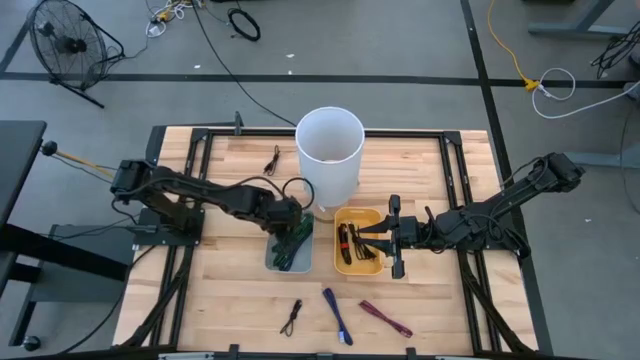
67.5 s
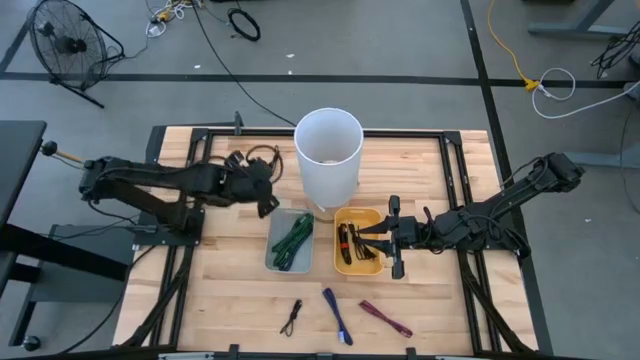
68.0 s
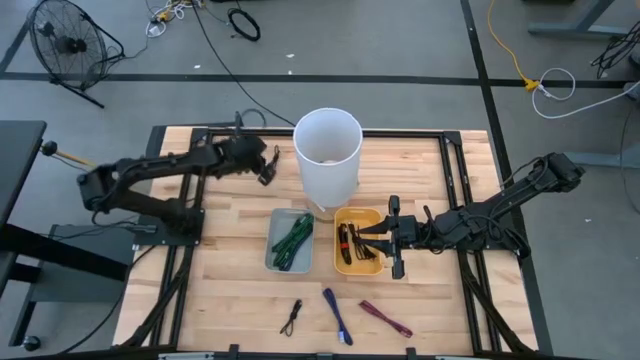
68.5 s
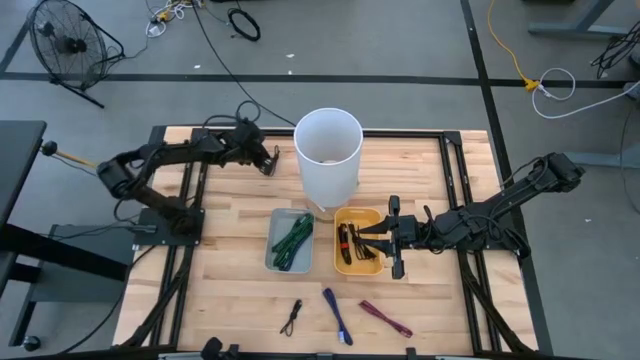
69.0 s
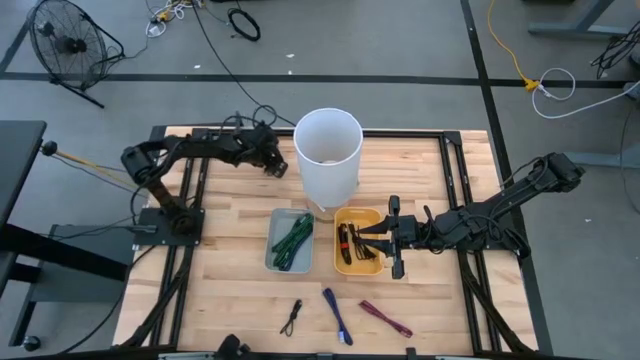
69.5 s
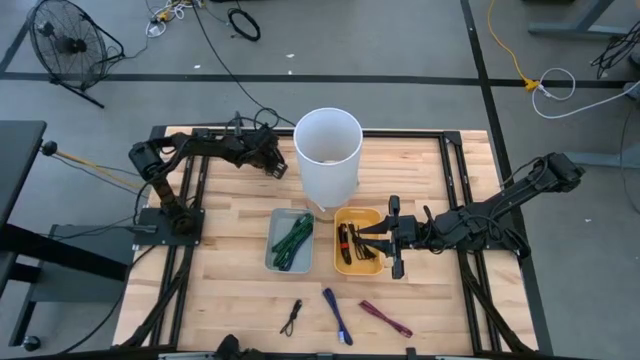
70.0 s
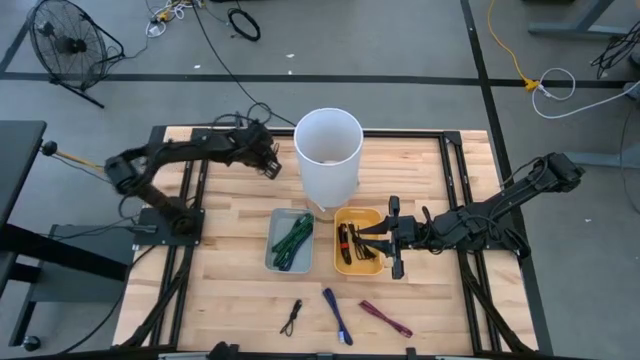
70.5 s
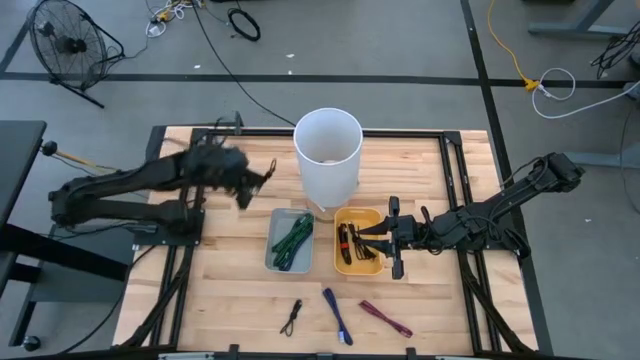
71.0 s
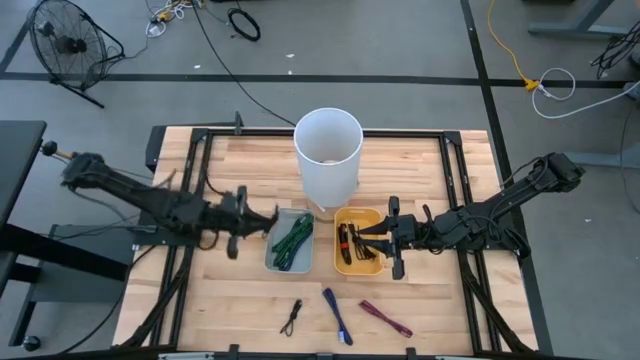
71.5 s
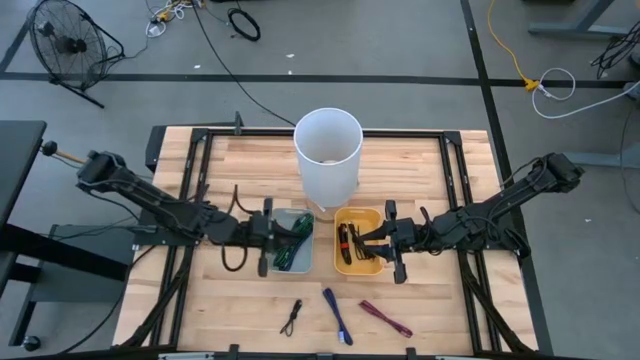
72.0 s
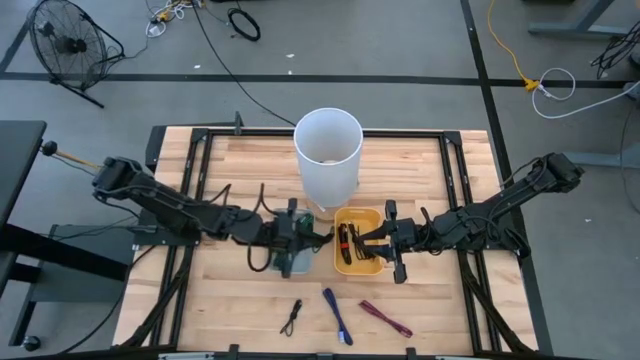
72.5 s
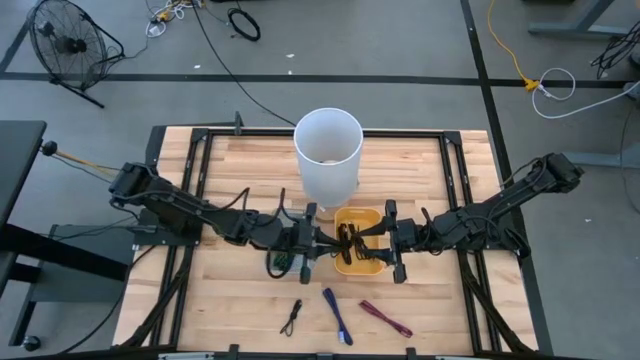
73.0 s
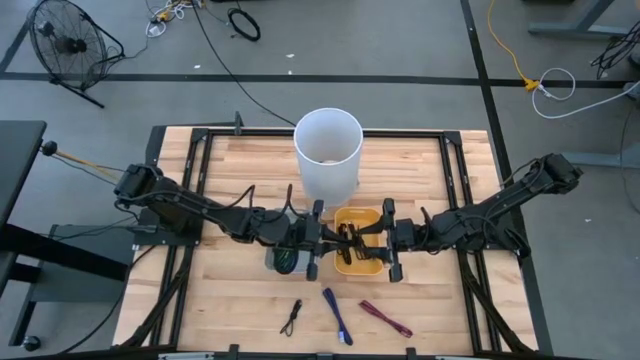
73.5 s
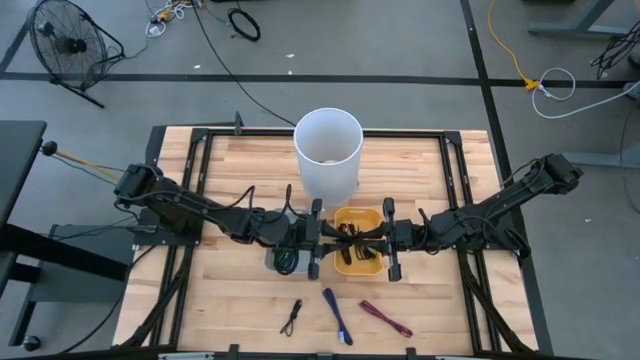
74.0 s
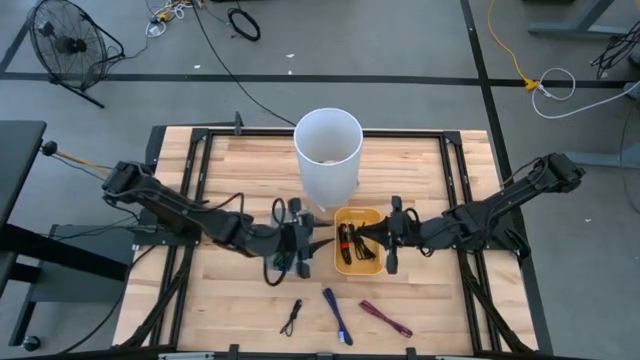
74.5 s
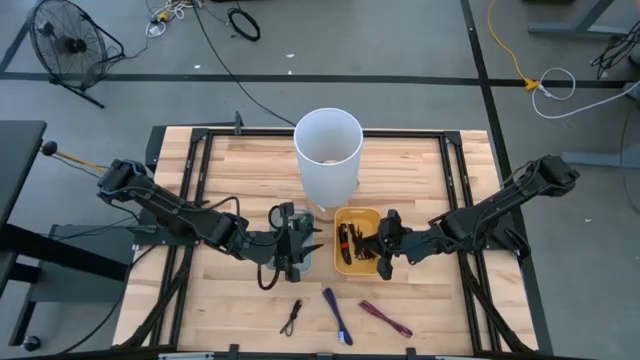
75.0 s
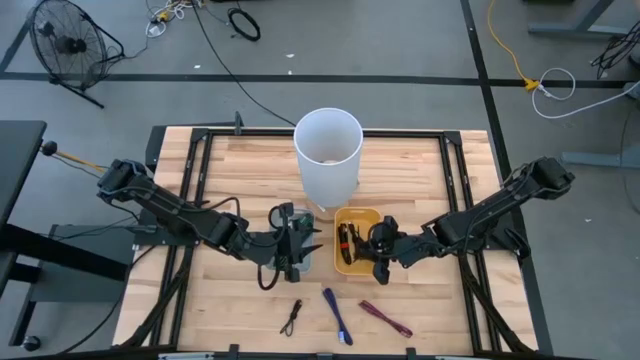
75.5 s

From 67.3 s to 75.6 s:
Task: Pick & Place USB Port
Put the black charger cable into the yellow bin

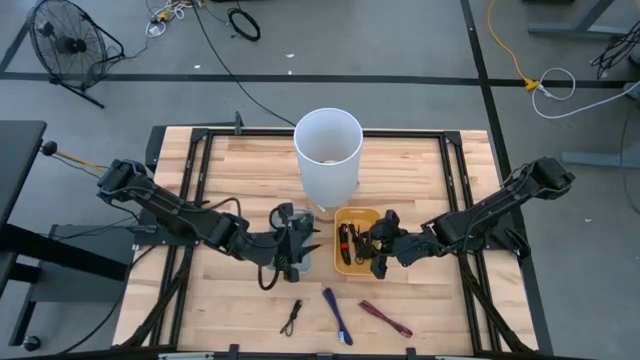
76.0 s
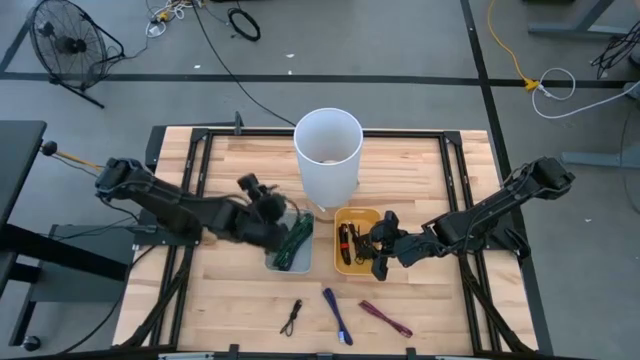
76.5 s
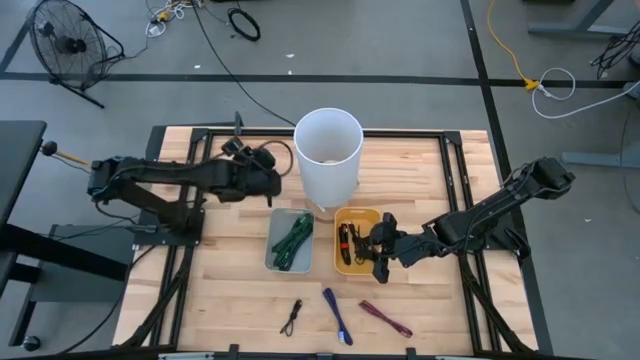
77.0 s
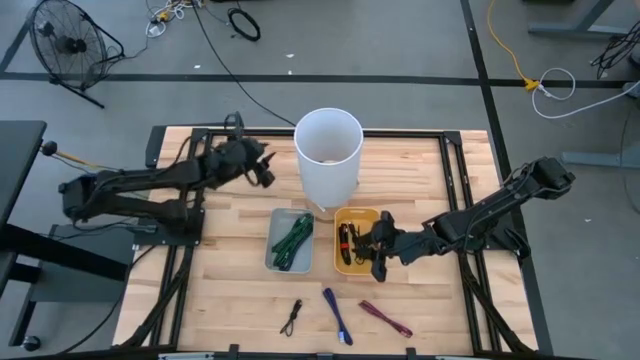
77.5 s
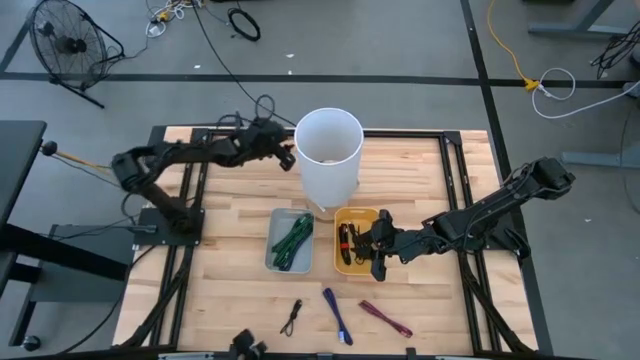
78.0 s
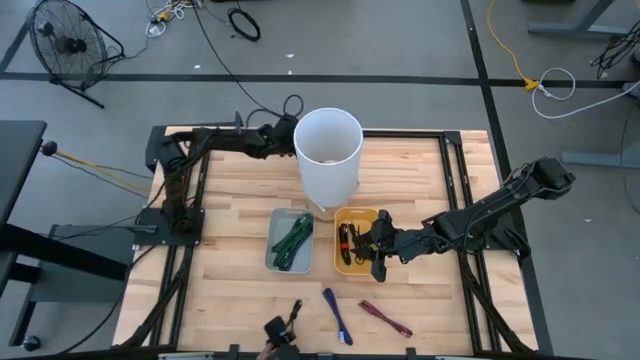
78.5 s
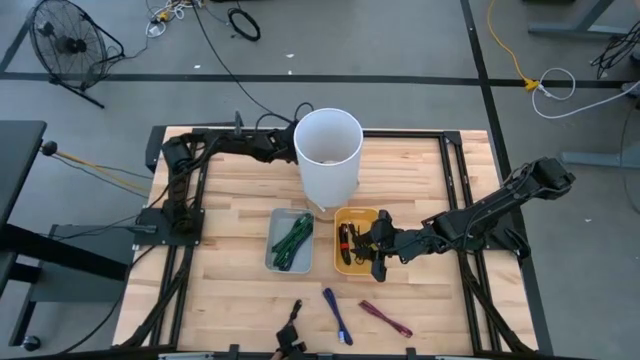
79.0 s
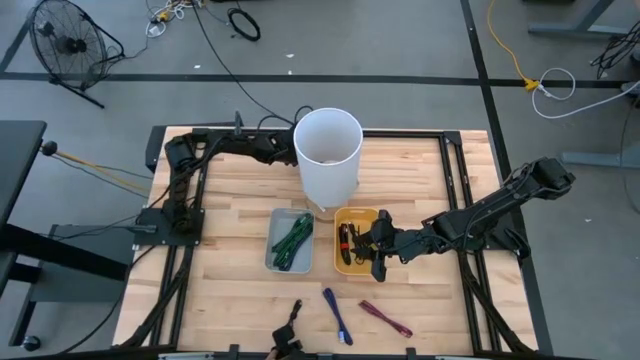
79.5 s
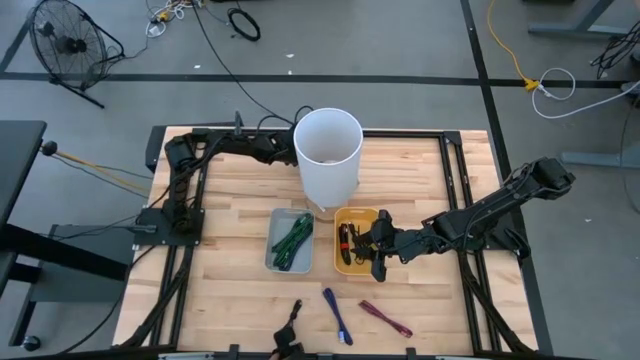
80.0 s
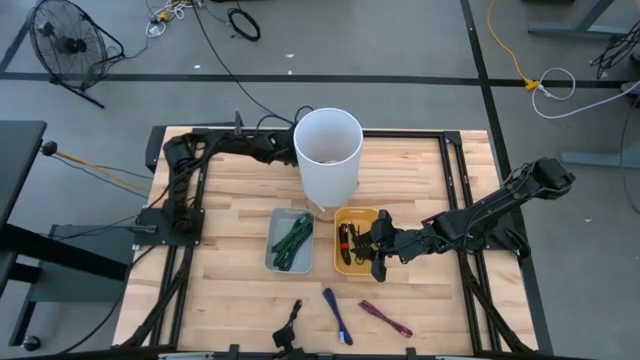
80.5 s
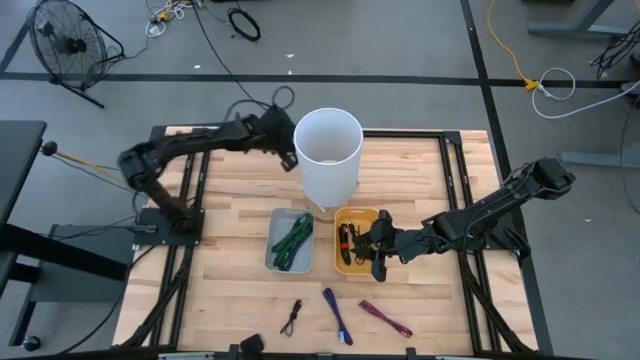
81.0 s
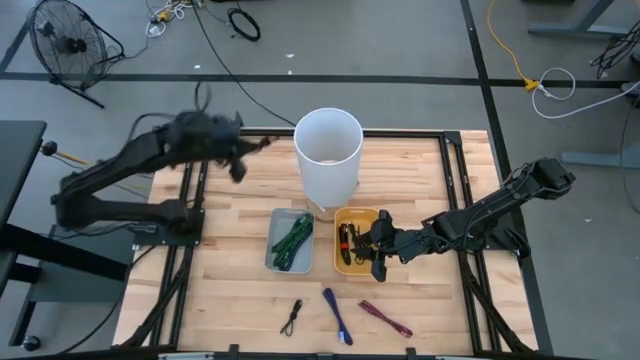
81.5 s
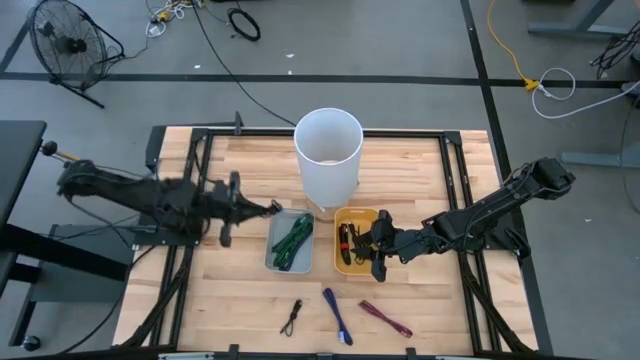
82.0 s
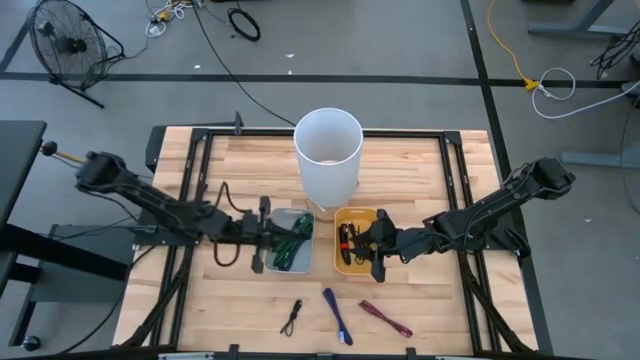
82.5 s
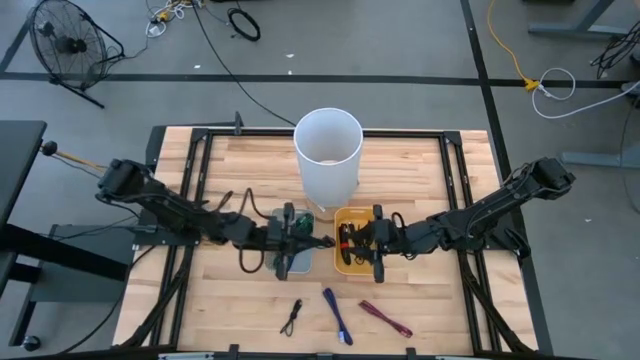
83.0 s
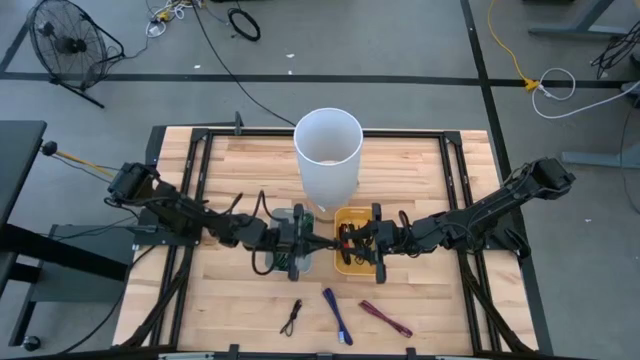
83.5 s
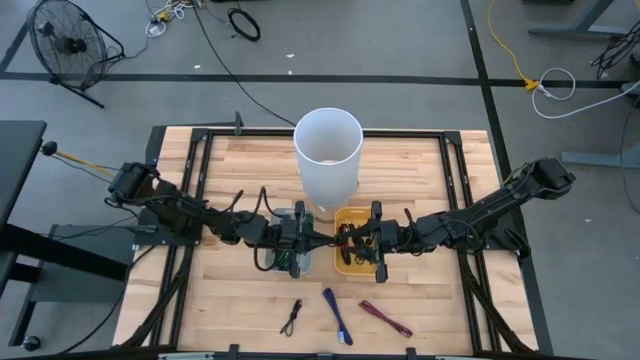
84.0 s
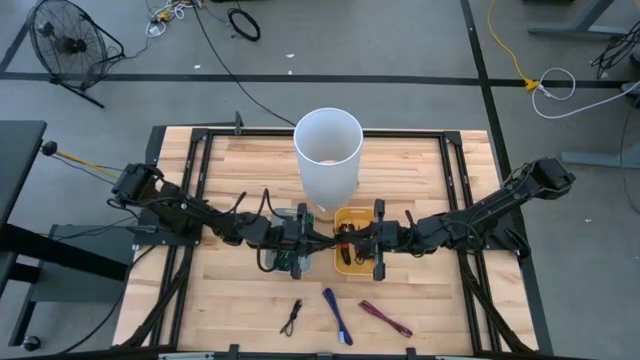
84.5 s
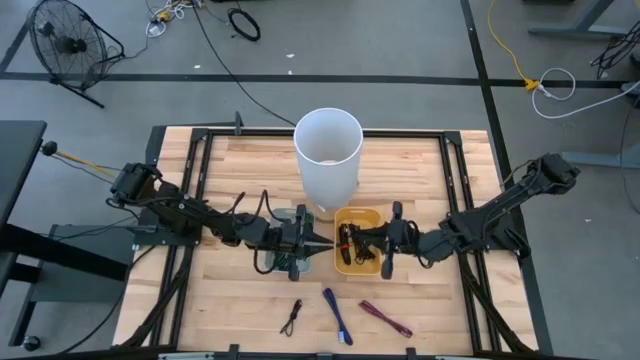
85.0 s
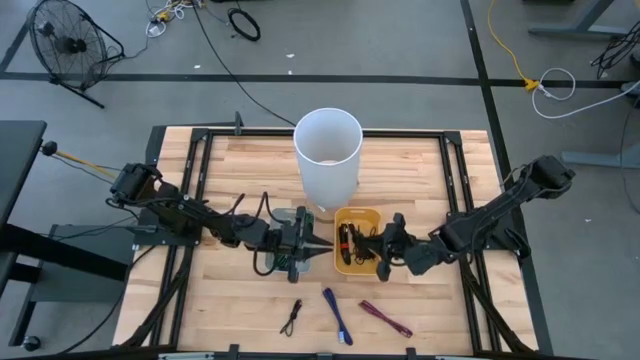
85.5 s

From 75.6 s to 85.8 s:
Put the black charger cable into the yellow bin

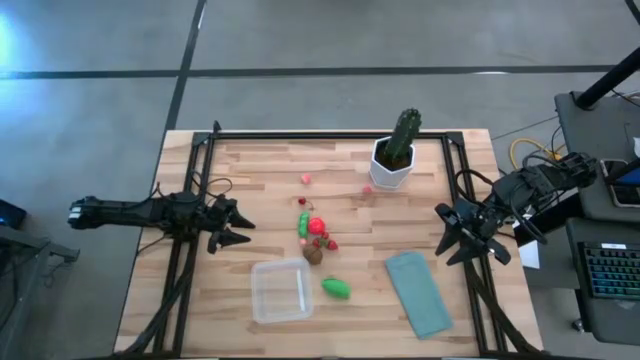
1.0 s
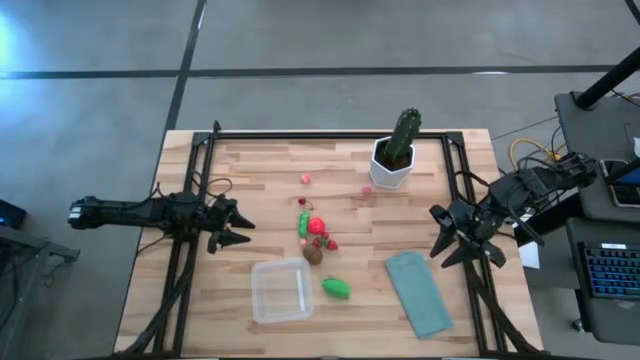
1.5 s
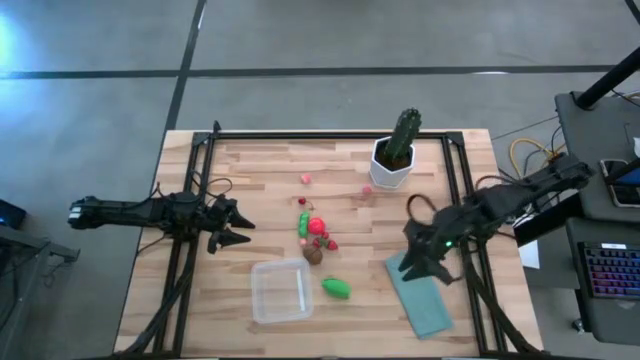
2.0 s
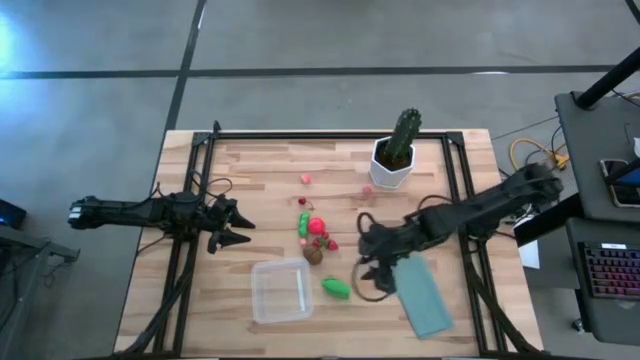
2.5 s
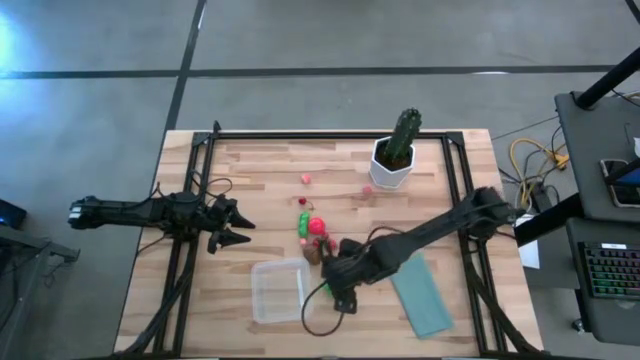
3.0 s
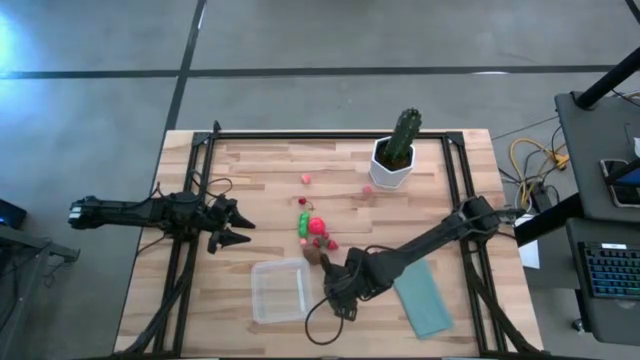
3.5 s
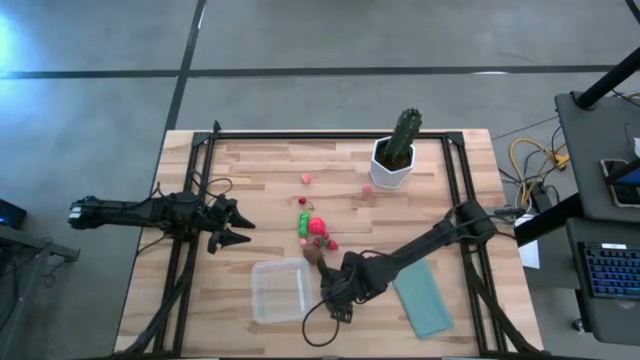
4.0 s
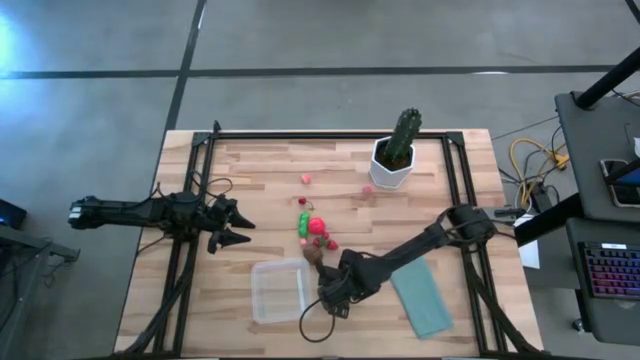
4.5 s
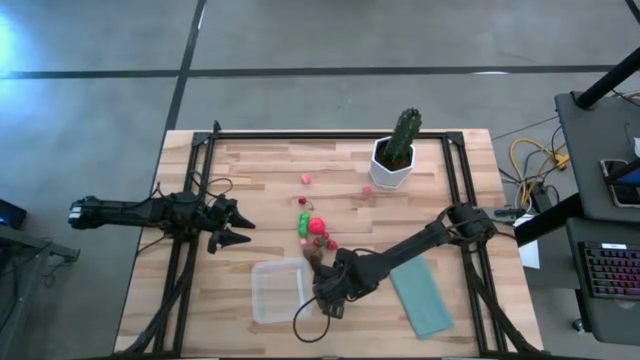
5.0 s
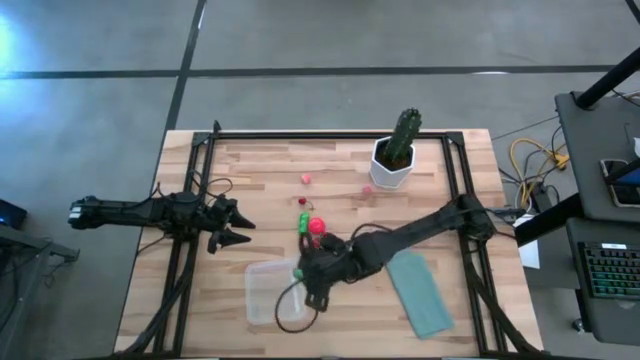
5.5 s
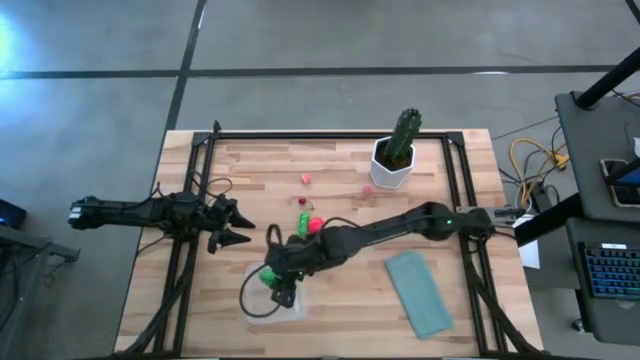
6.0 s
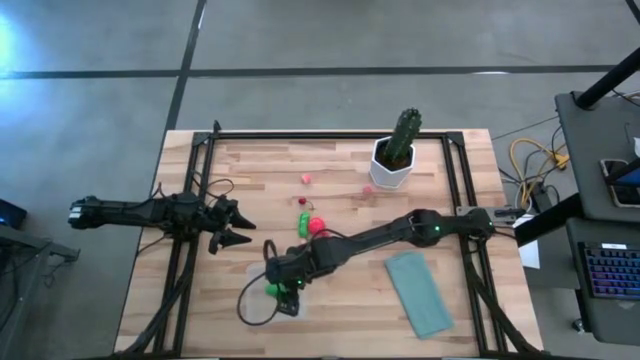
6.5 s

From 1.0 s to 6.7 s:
Task: Pick and placing Produce into tupperware
Put the green corn into the transparent bin
